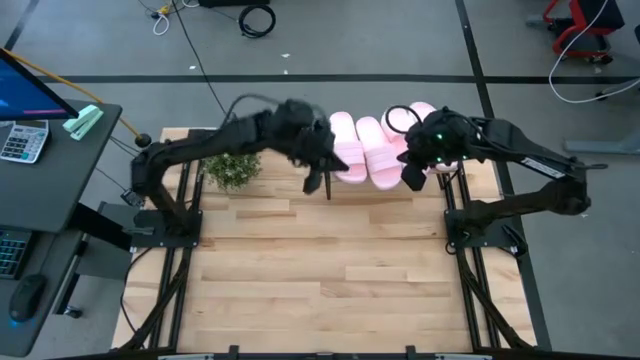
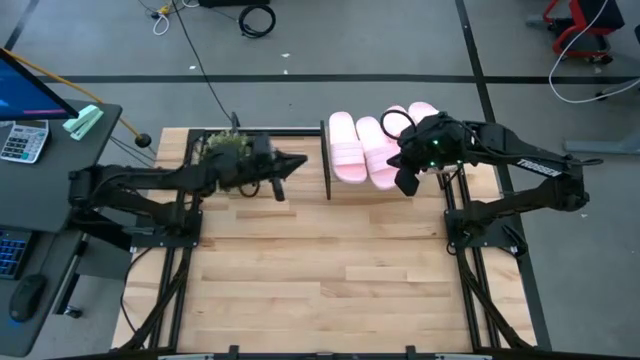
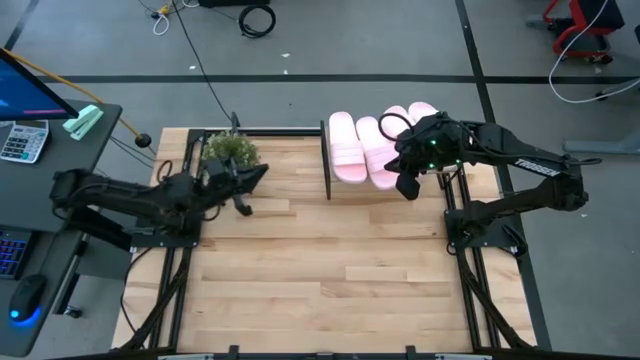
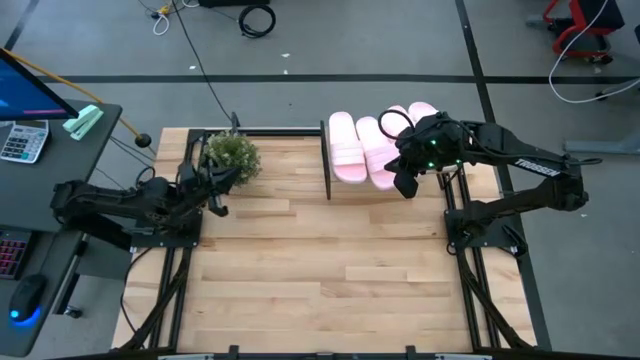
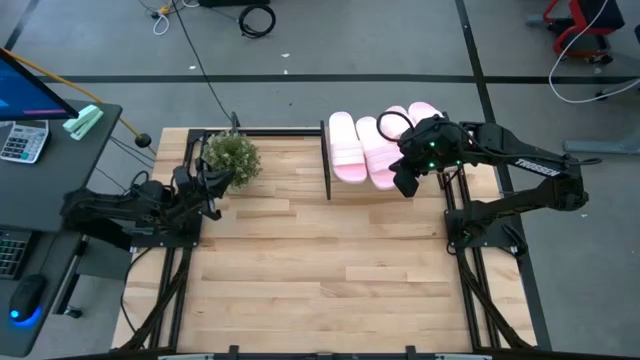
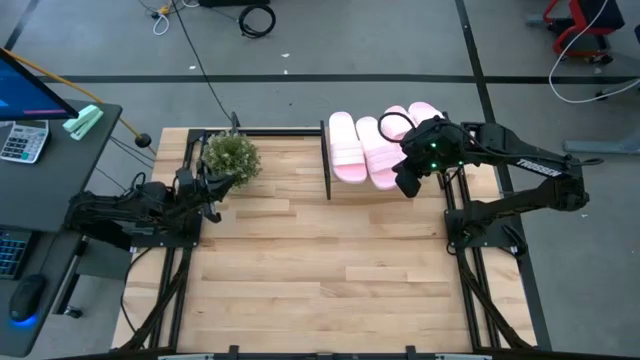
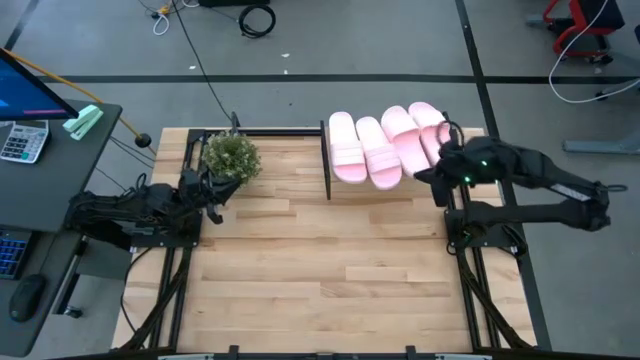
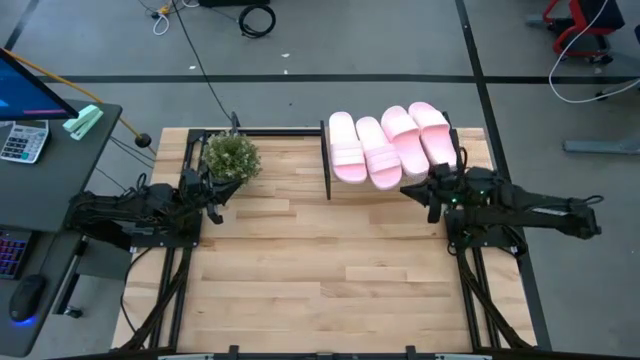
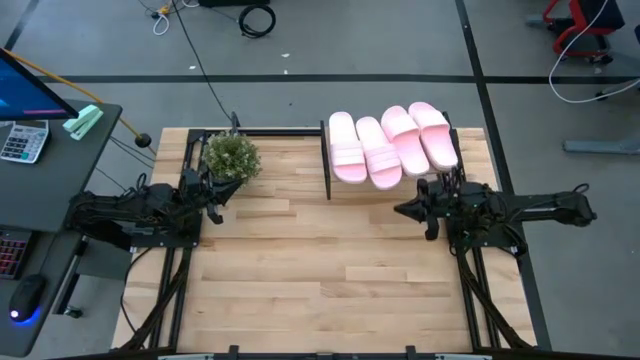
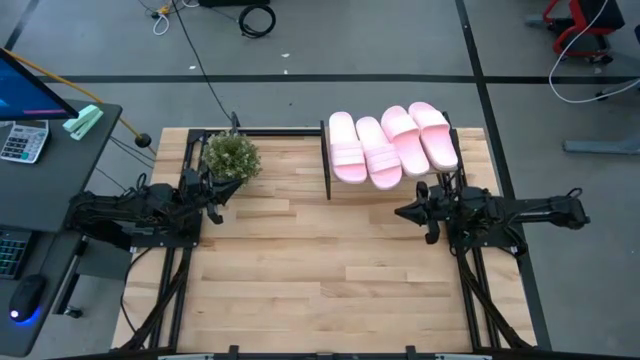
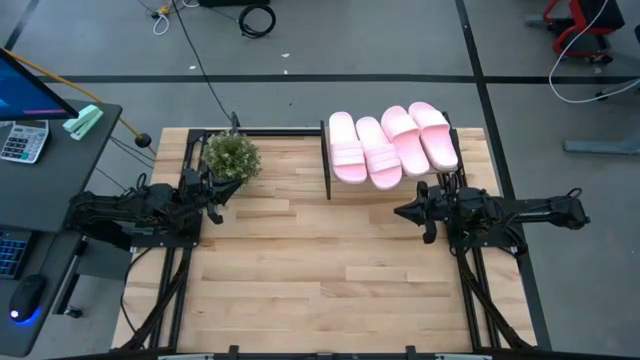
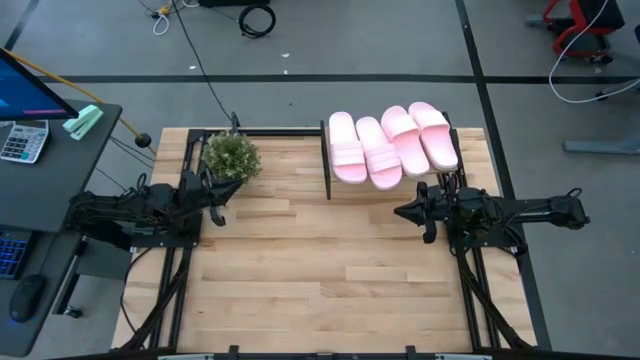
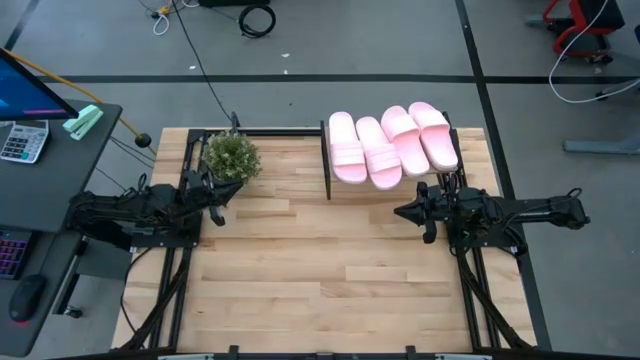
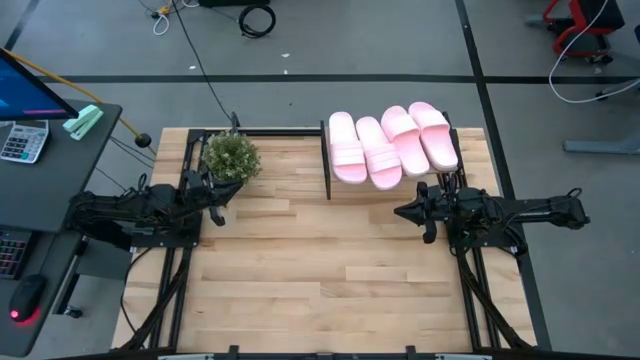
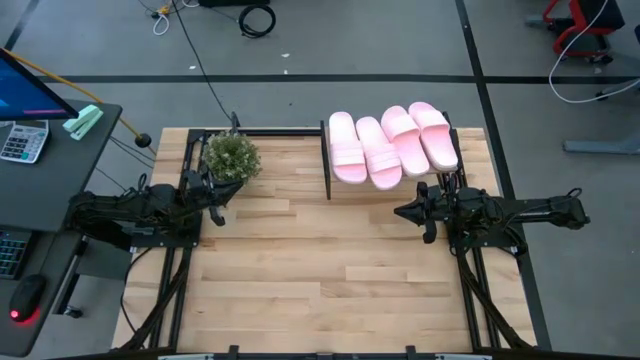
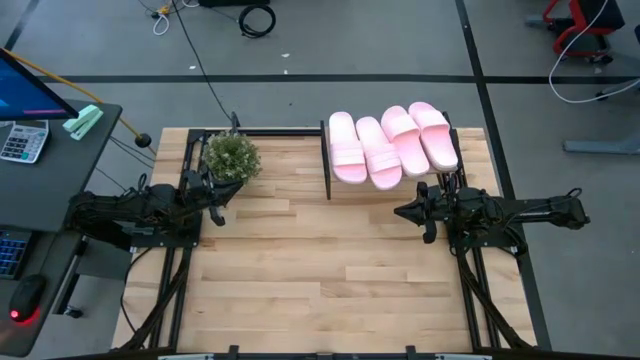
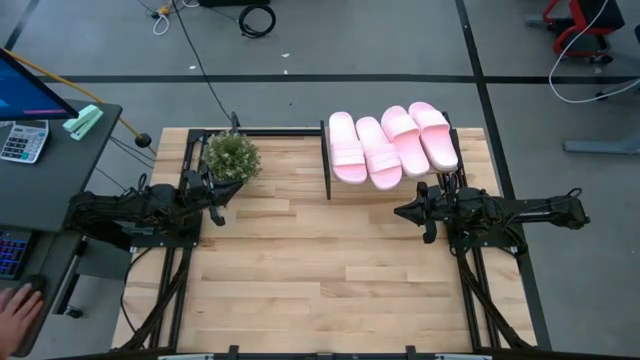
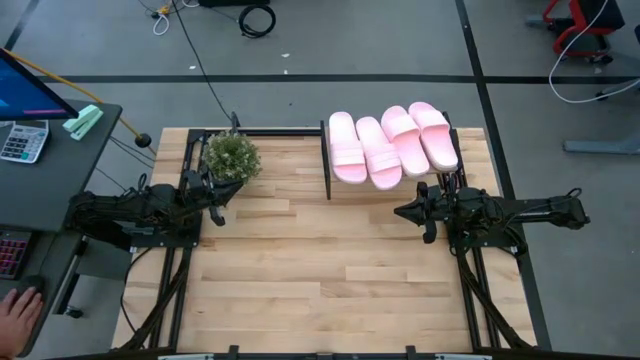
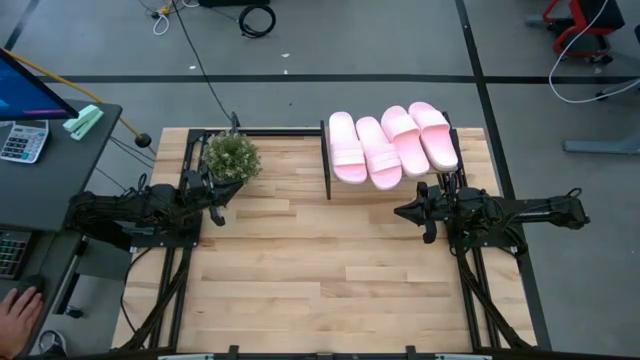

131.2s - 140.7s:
Task: Pick and place slides into the shelf
Return to Home Position

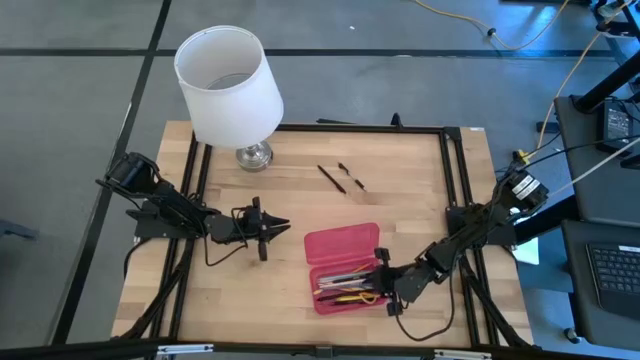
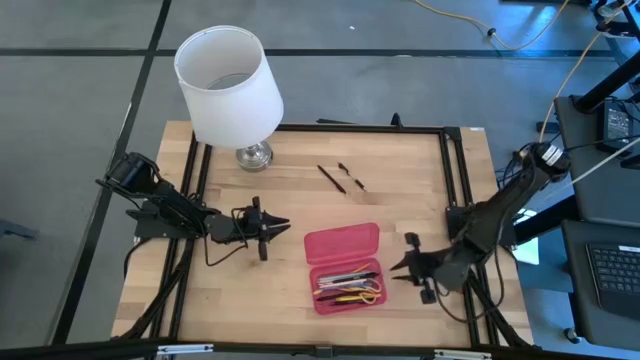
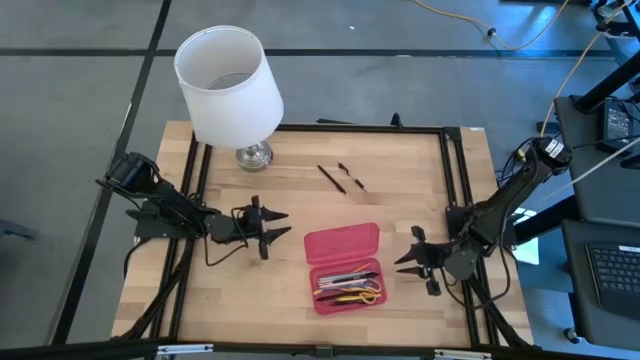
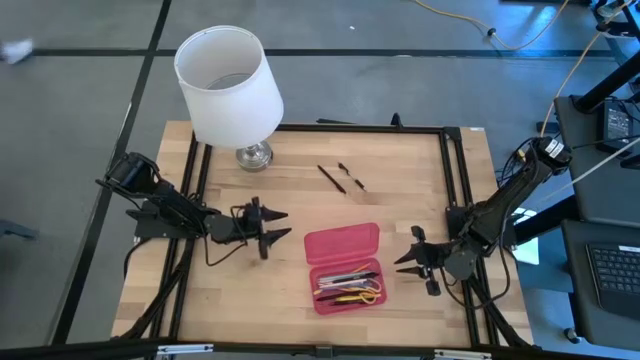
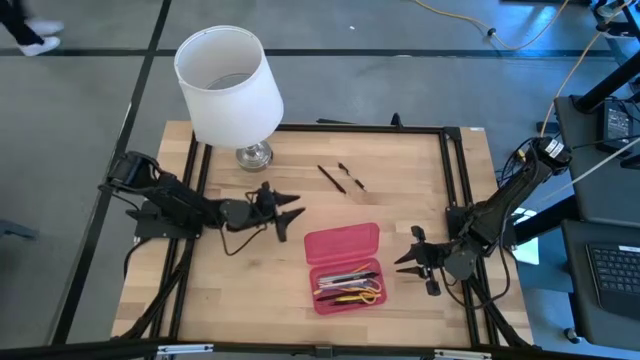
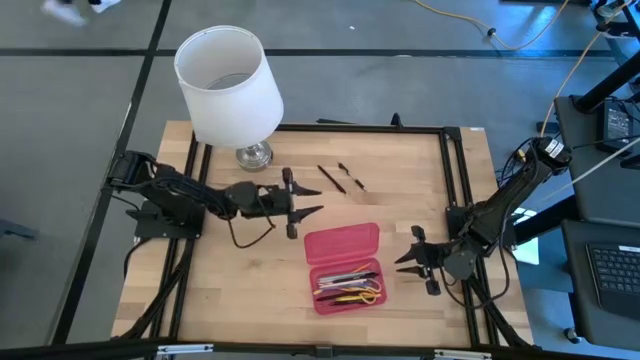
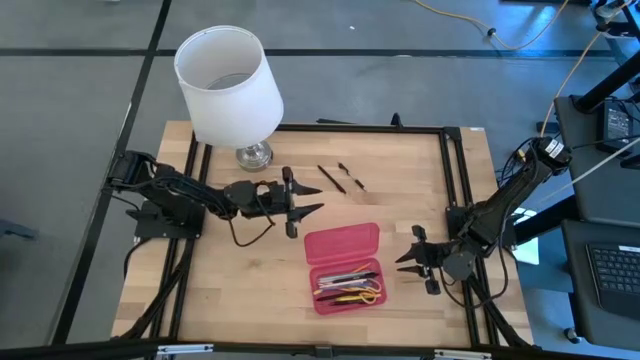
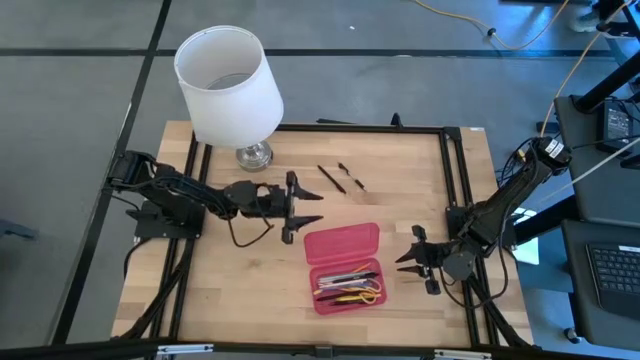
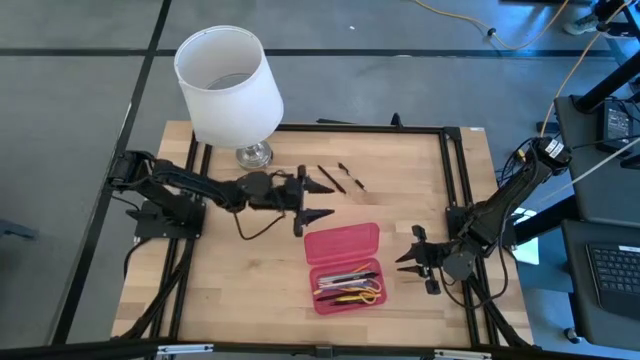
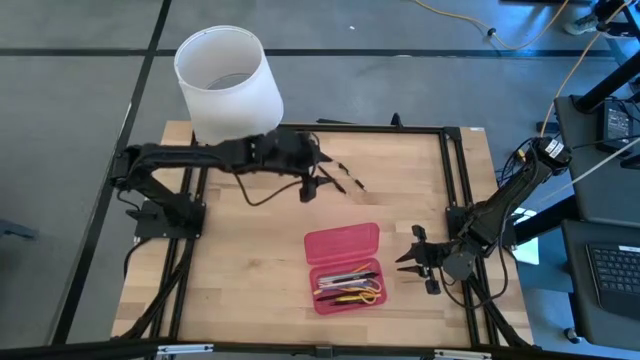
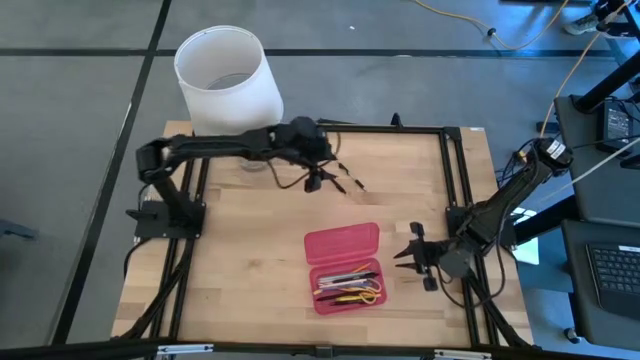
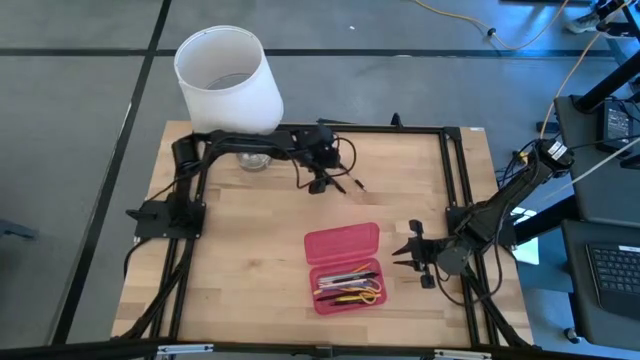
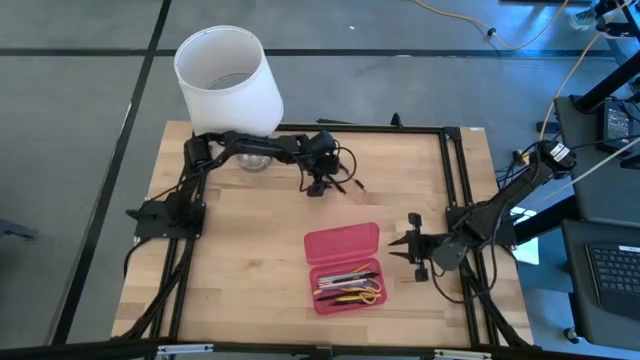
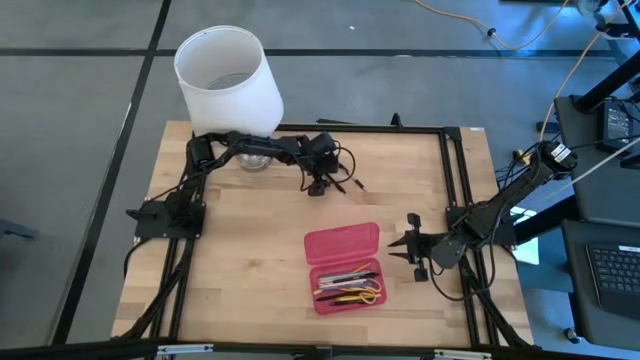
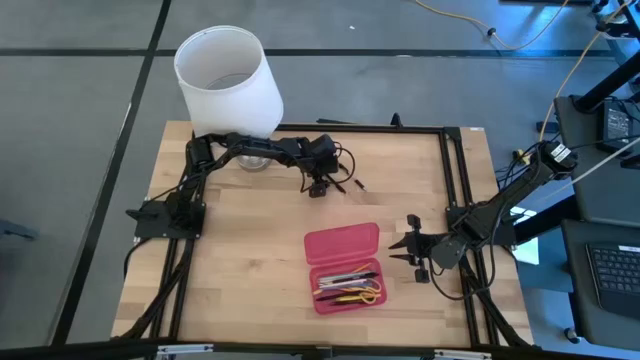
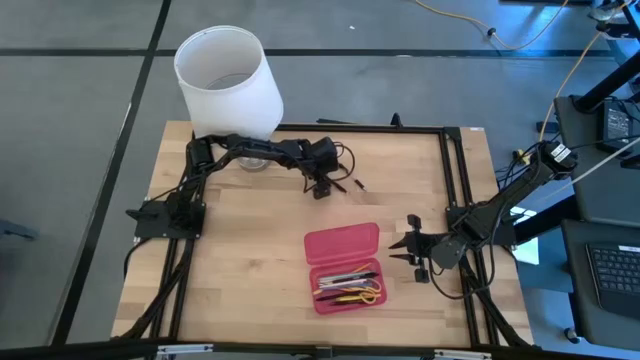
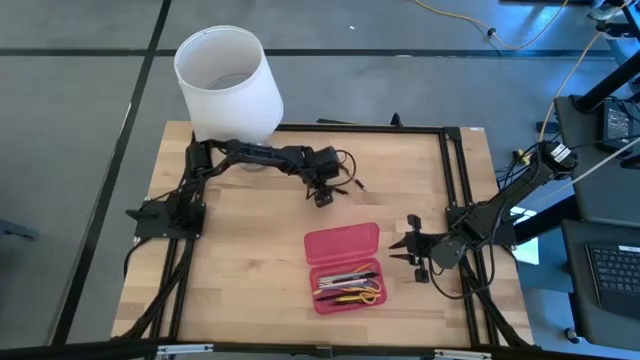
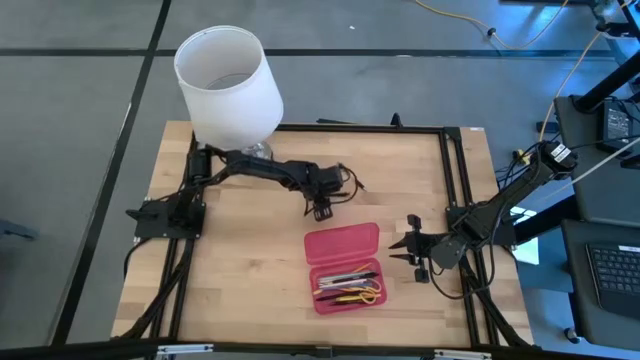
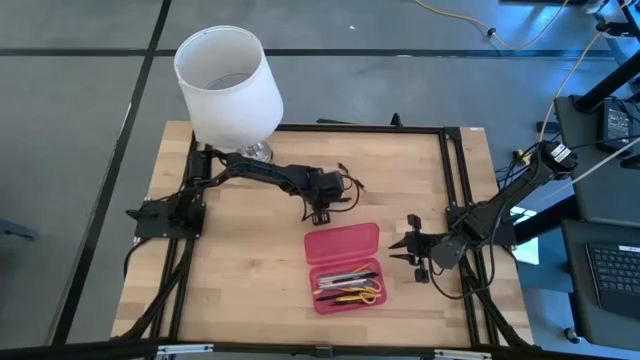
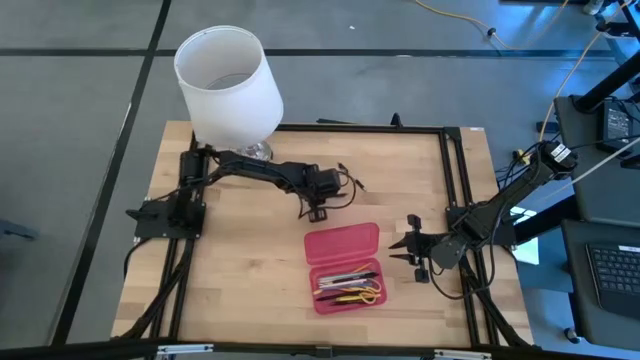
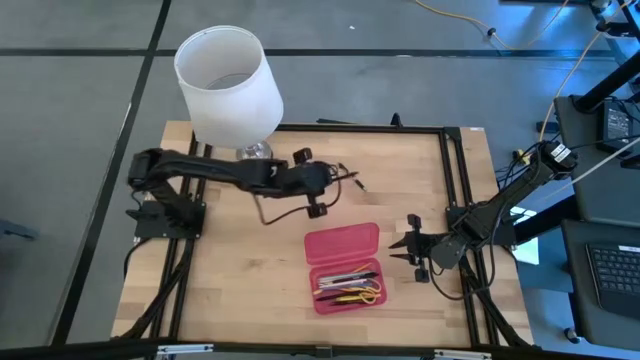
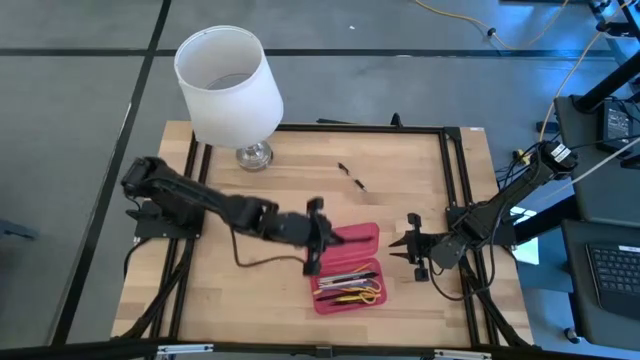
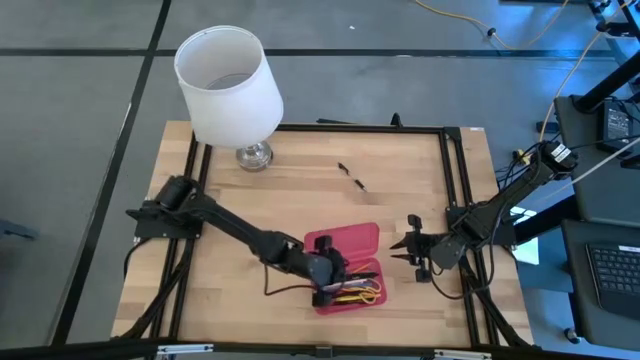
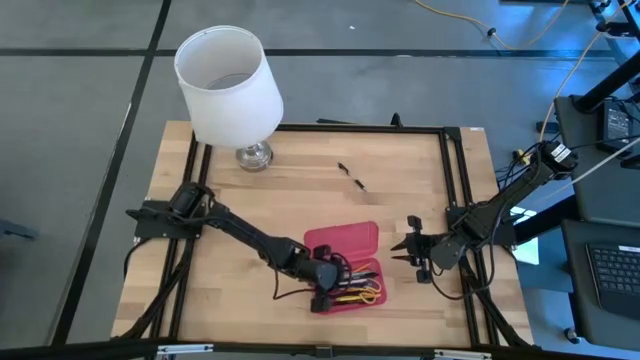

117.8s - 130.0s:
Task: Pick & place school supplies into a supply box
Put the black pen into the pink supply box
